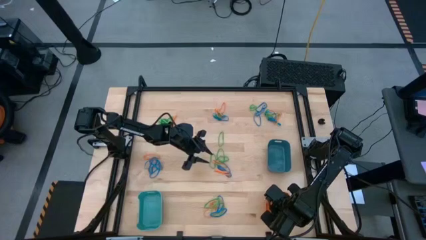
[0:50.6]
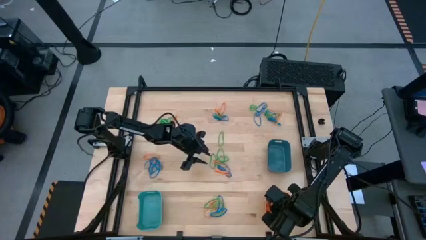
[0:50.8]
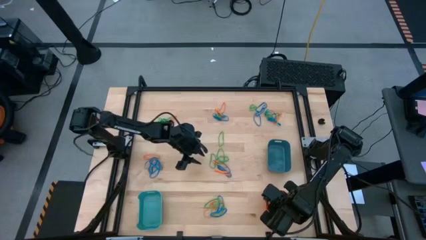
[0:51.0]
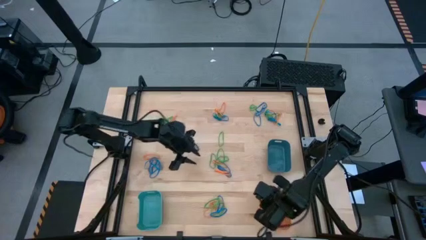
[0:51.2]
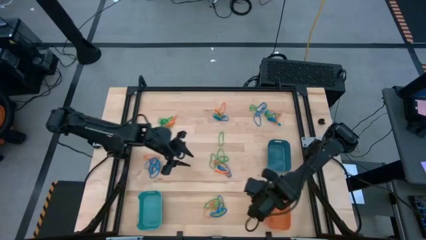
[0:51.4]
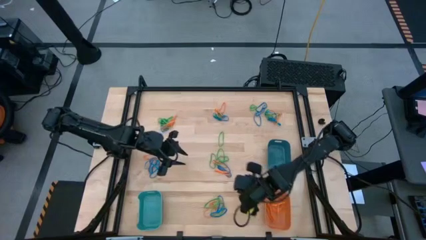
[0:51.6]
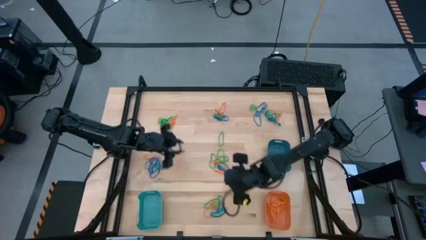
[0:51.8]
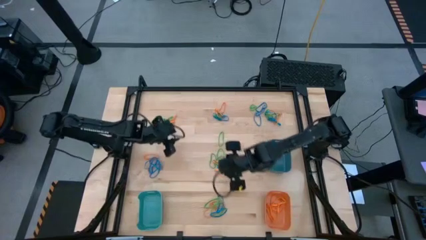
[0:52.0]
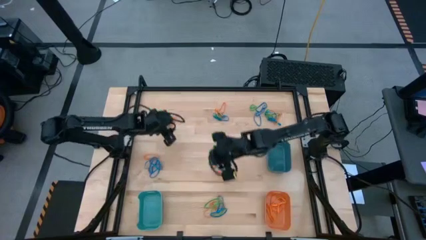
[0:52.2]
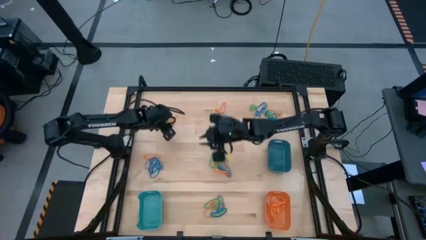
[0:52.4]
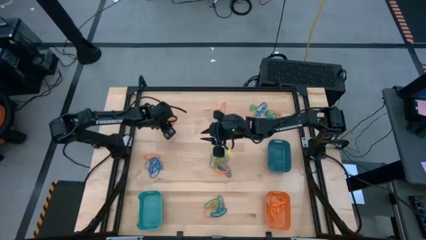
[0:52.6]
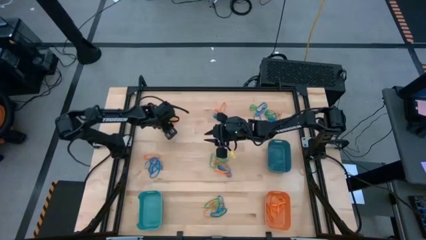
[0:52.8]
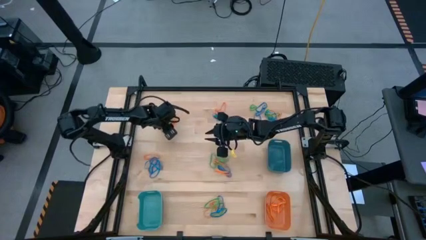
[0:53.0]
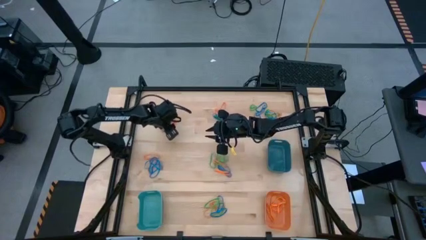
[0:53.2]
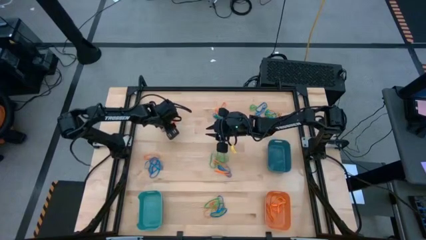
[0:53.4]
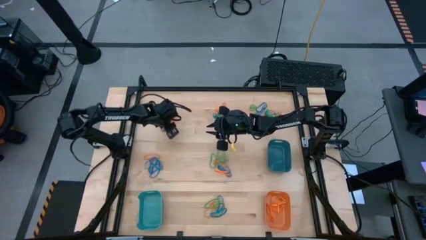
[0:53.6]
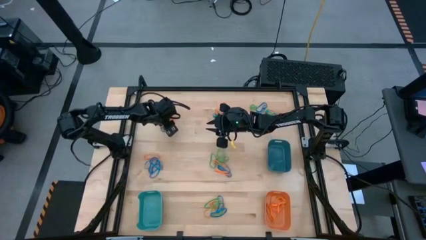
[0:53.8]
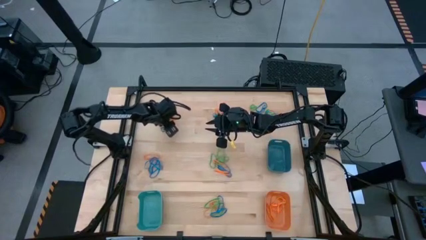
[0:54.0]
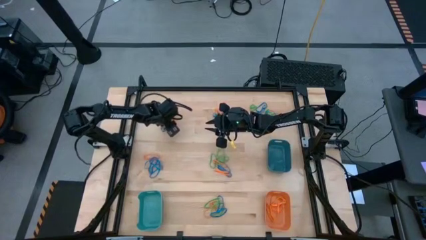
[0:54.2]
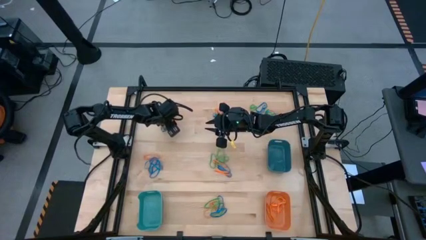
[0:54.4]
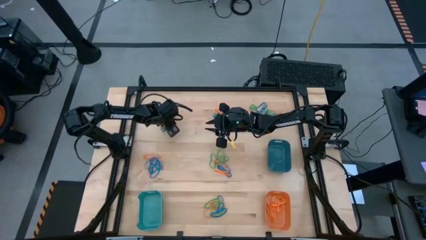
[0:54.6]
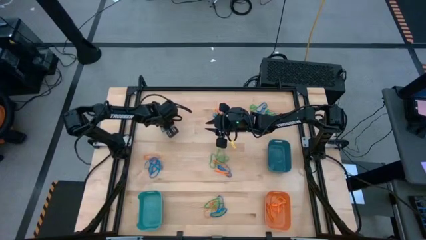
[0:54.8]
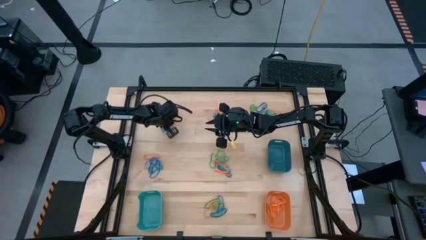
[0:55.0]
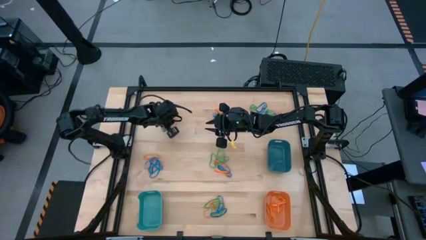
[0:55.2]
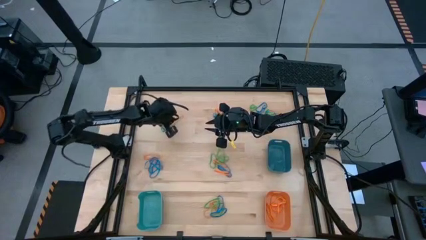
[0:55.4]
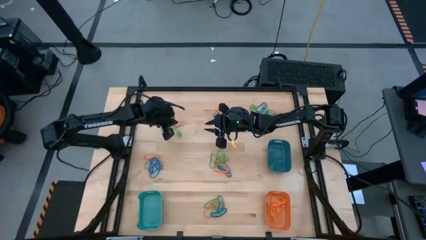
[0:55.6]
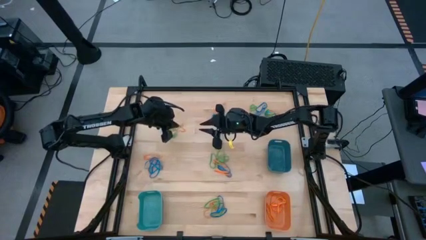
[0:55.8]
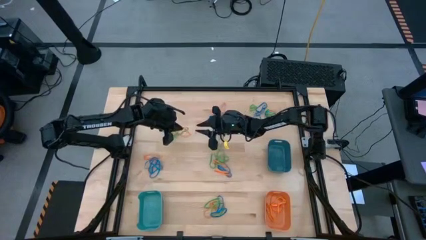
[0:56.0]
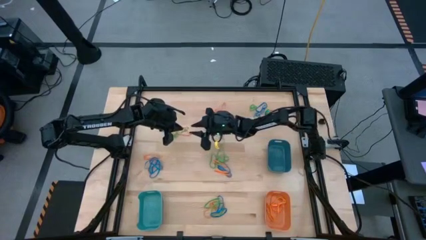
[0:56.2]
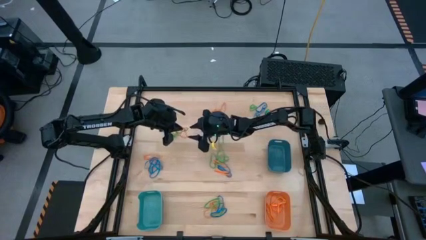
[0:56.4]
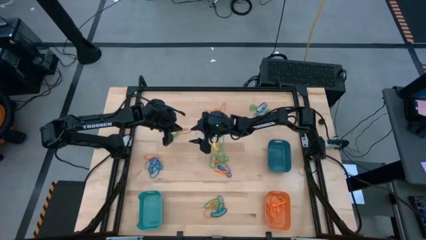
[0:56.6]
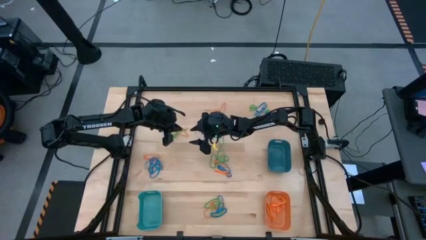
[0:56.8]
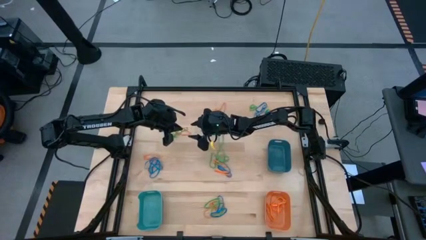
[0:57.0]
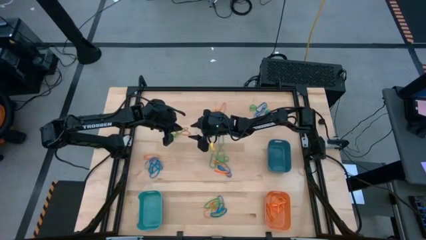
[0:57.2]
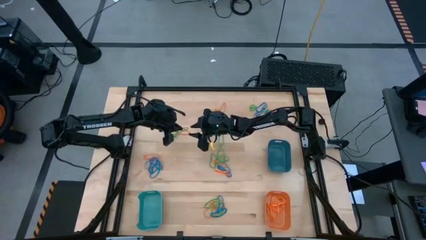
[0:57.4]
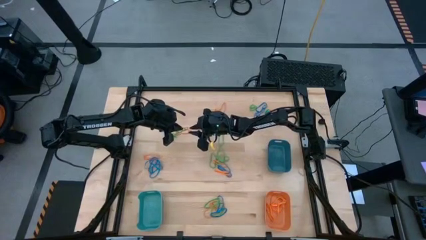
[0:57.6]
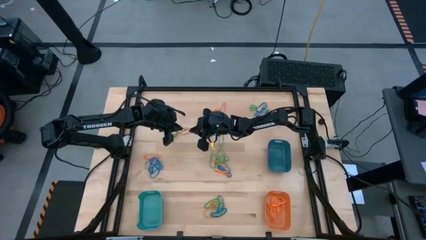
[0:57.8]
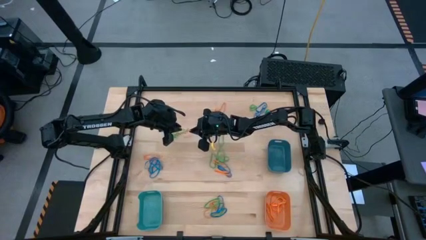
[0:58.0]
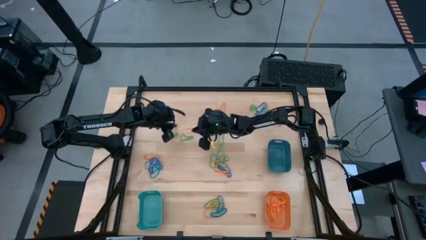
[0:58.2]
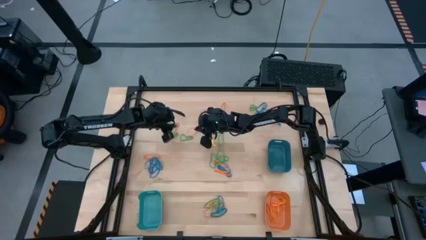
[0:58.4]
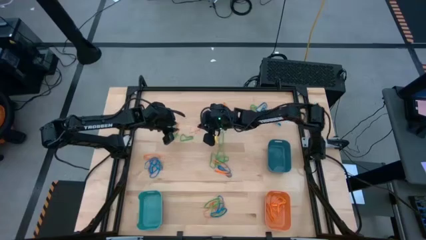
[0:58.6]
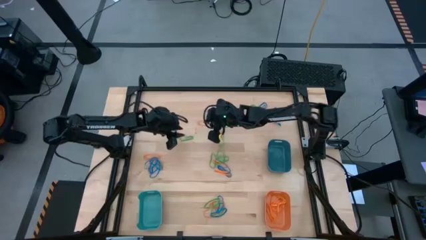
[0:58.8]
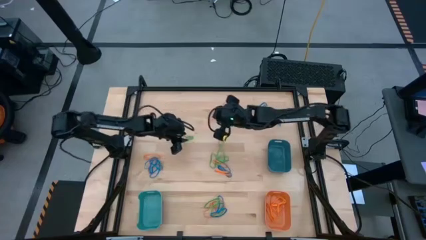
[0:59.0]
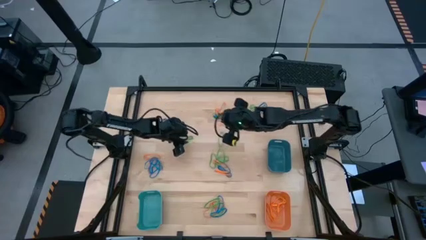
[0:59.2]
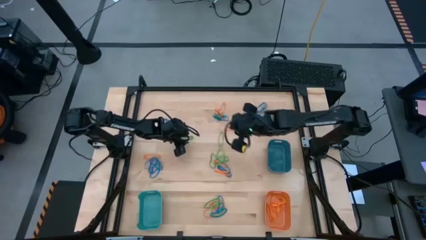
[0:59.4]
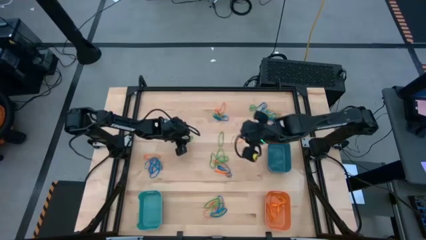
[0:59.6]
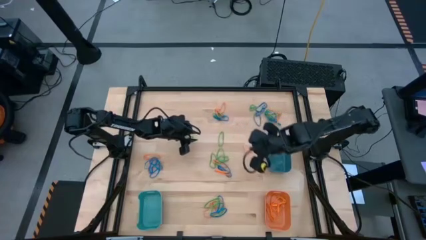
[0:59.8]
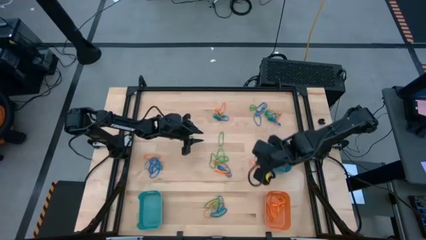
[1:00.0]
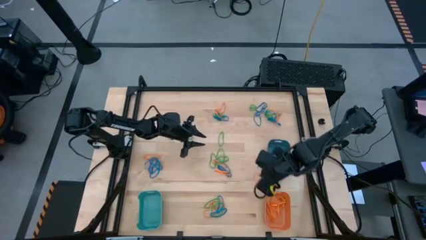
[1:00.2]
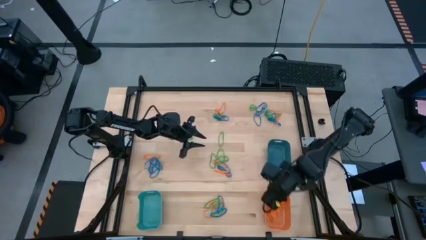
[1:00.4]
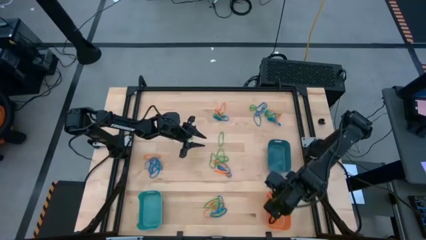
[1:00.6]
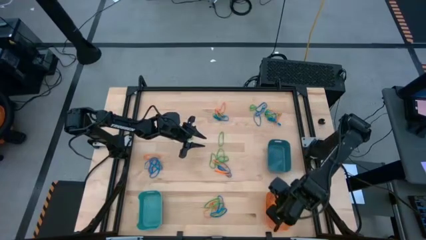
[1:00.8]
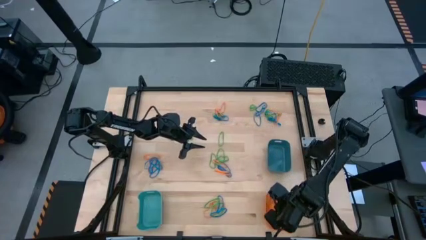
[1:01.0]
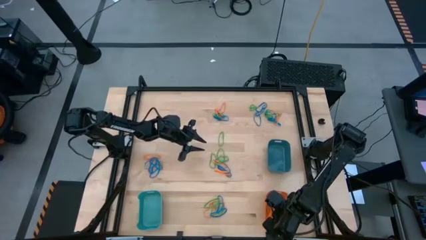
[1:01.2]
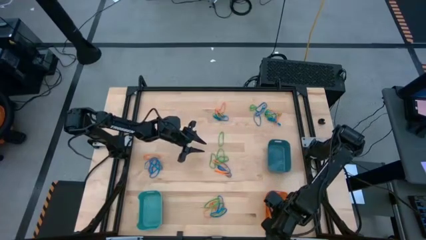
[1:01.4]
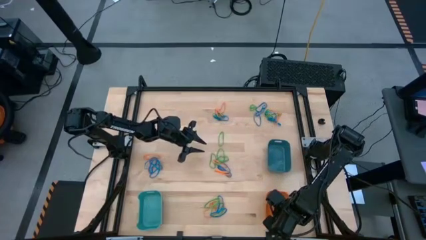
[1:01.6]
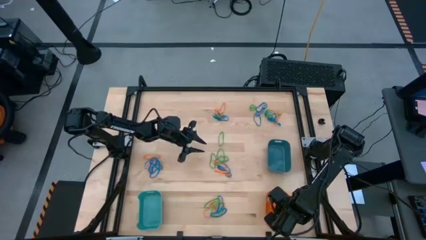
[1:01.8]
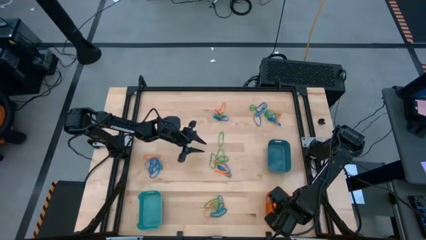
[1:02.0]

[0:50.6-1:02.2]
Task: Sort rubber bands into baskets
Put the orange rubber band into the orange bin

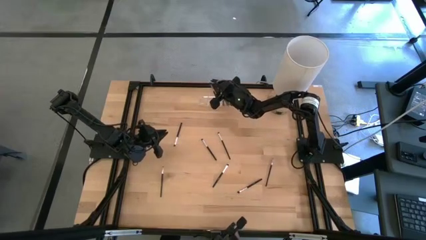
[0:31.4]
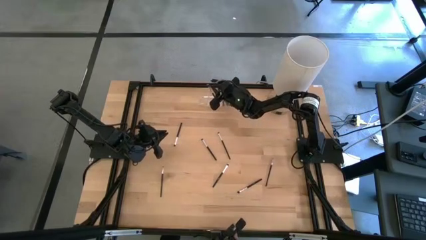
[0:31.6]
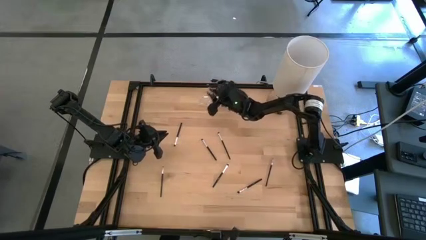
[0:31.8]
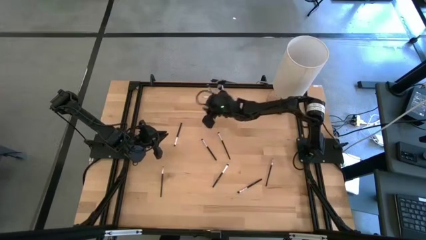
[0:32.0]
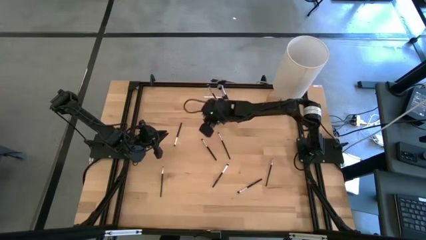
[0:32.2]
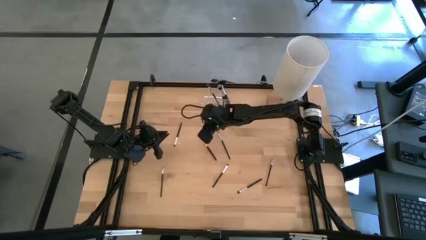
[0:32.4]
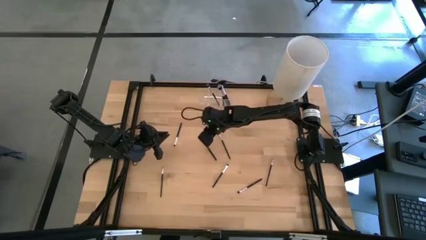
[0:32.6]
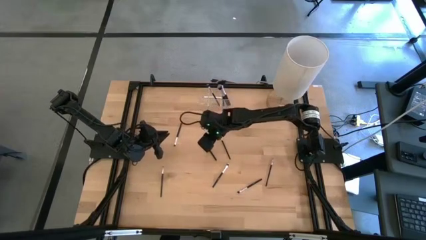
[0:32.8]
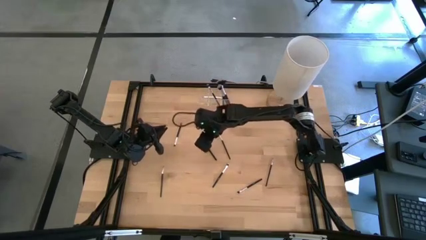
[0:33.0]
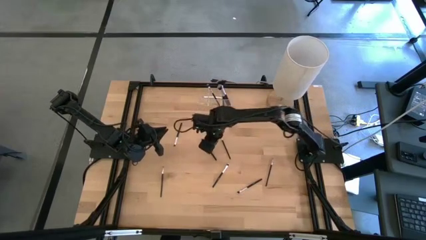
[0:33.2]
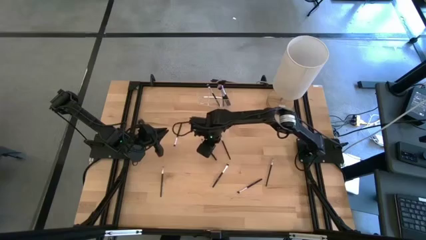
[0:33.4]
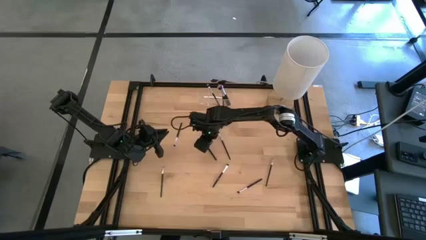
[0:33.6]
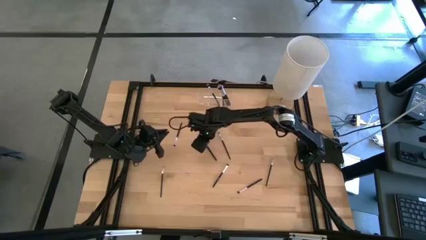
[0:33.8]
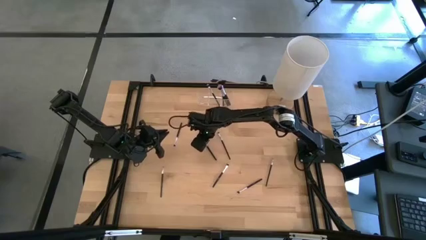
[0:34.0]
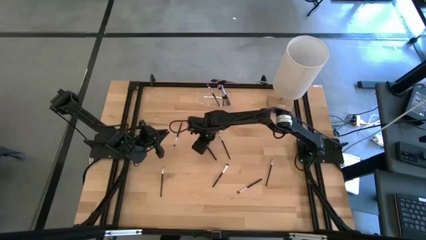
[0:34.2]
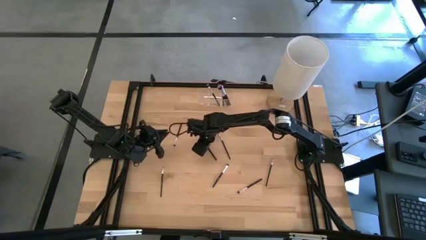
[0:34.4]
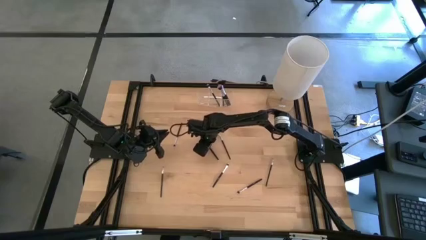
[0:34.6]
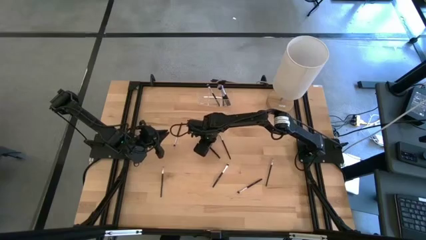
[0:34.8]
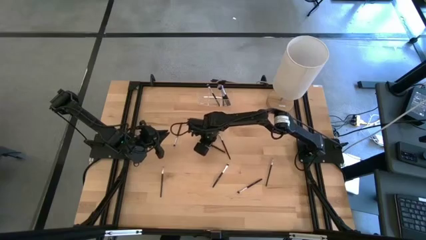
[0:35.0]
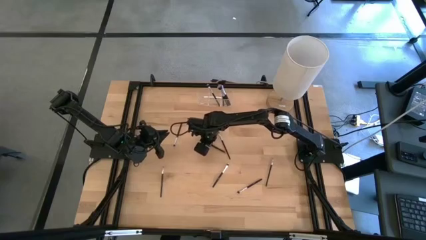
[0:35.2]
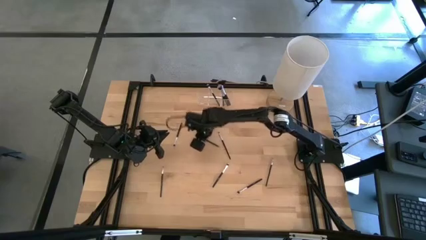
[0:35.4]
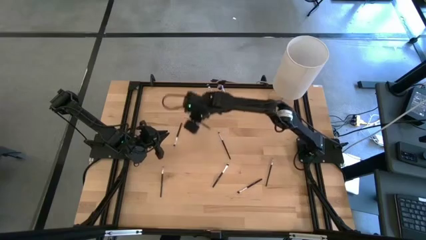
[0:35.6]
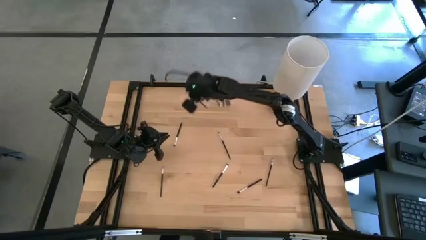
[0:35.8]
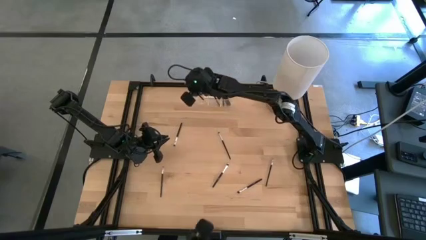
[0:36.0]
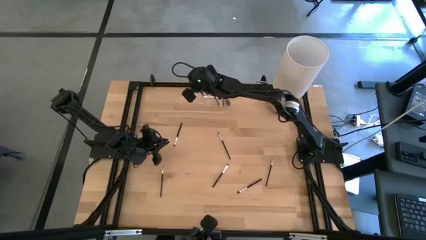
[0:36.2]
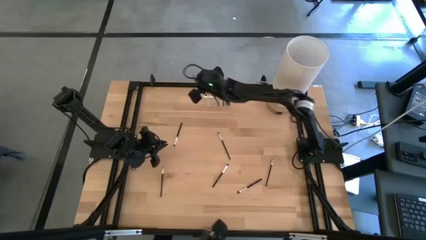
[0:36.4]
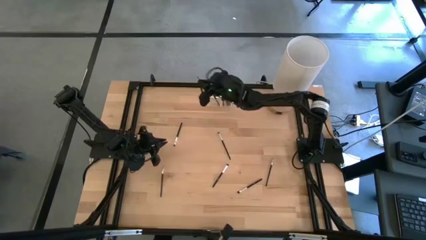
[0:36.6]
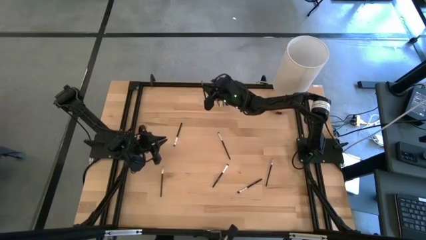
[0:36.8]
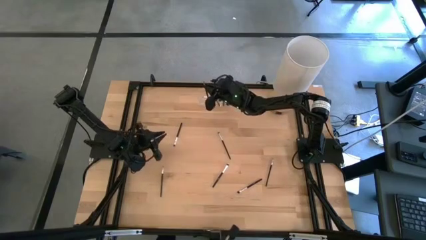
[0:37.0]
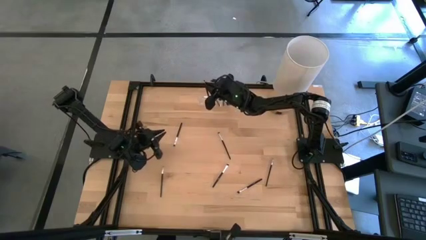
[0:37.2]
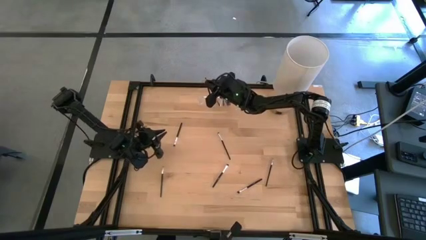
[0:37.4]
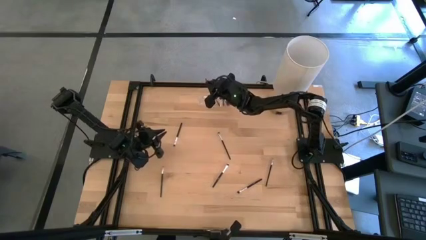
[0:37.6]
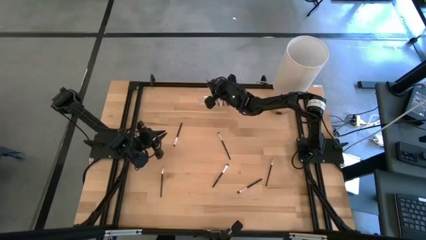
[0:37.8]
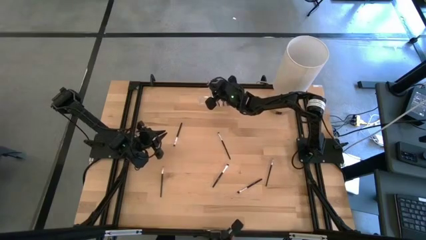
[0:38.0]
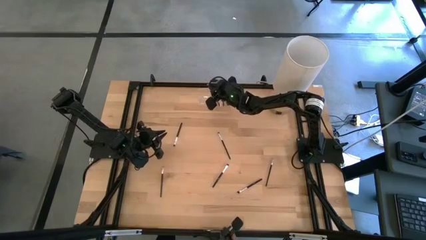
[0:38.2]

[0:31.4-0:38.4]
Task: Put items in baskets/containers
Put the black eyeshadow brush into the transparent organizer
